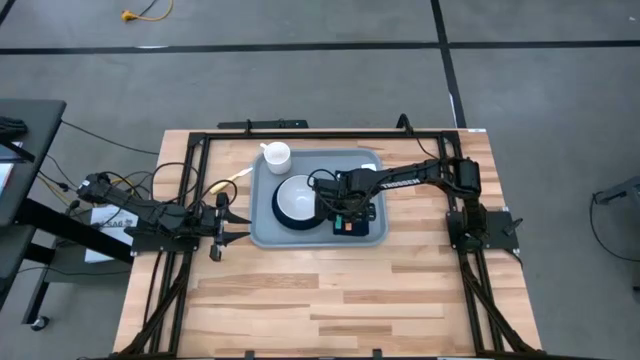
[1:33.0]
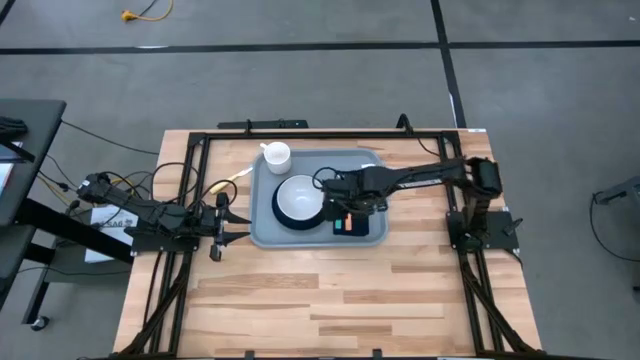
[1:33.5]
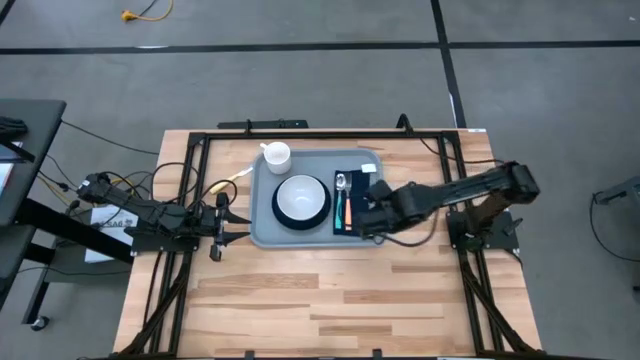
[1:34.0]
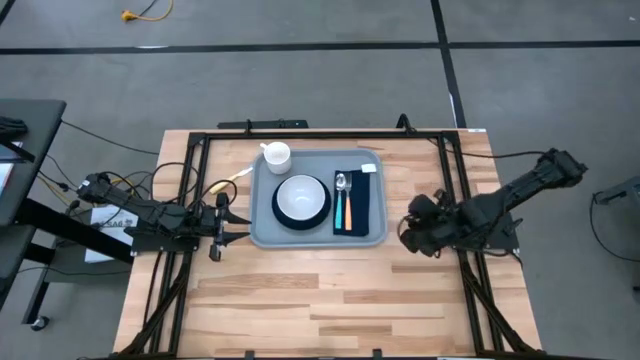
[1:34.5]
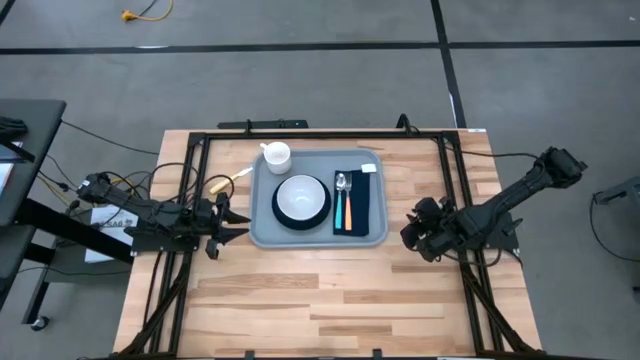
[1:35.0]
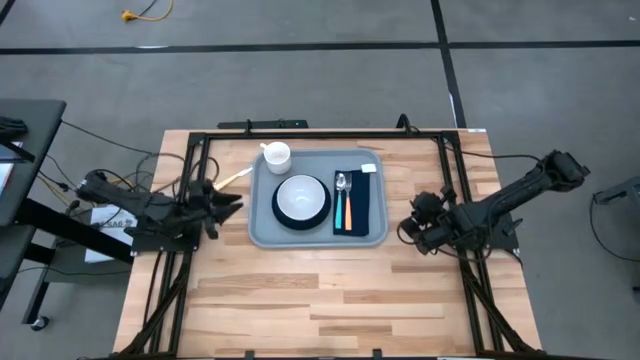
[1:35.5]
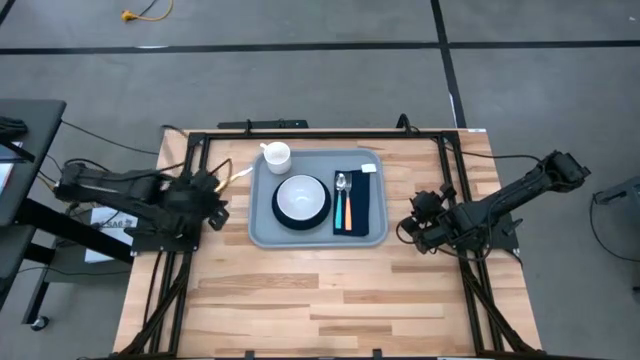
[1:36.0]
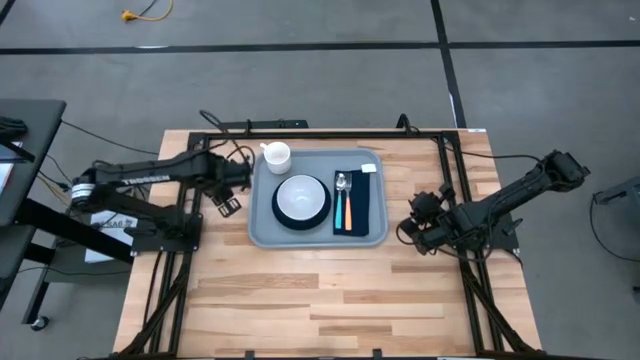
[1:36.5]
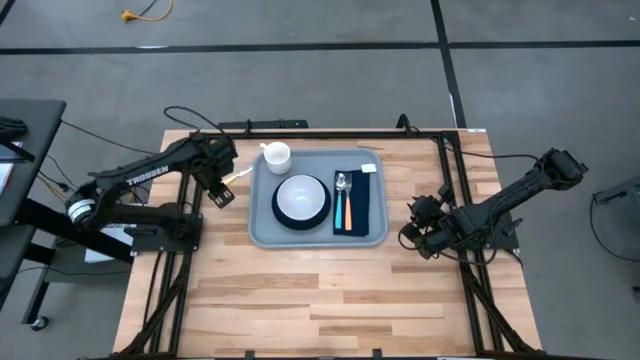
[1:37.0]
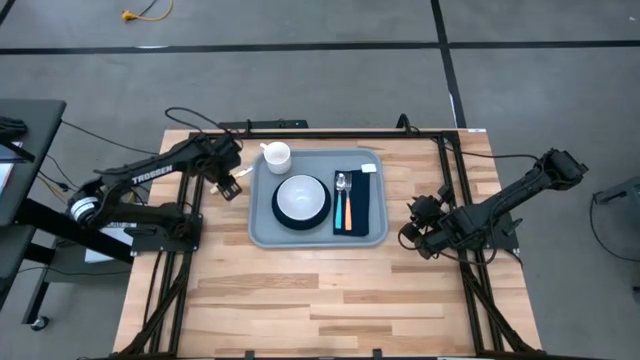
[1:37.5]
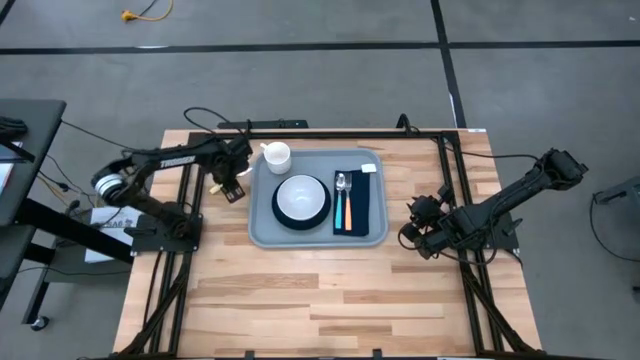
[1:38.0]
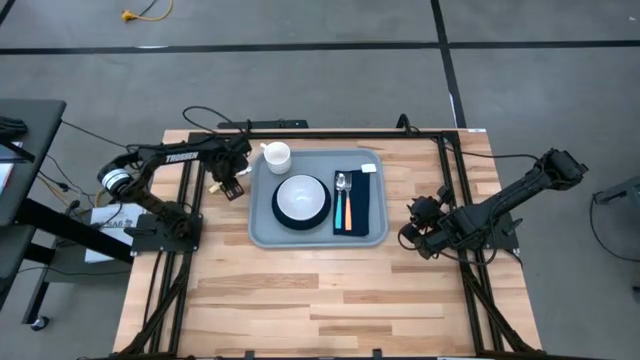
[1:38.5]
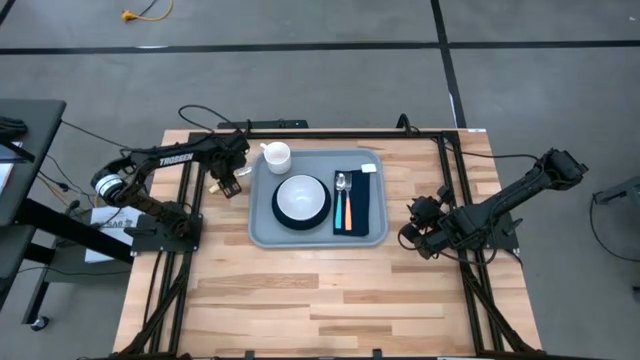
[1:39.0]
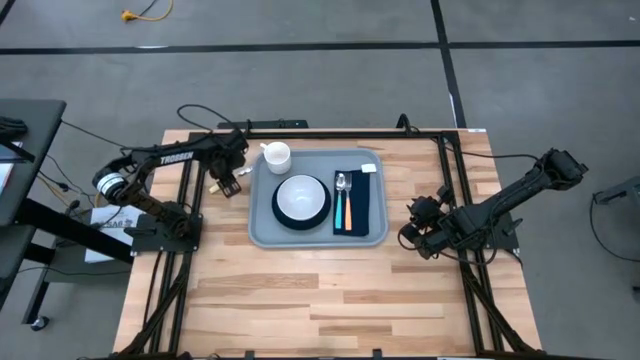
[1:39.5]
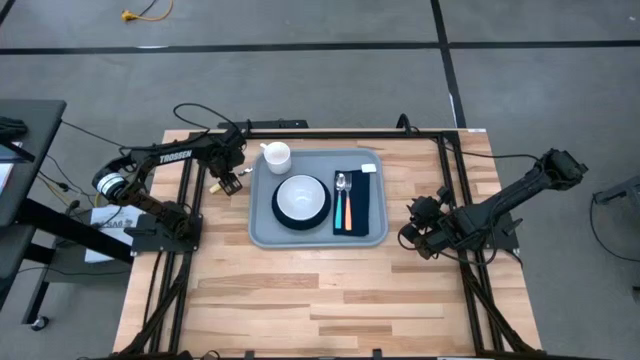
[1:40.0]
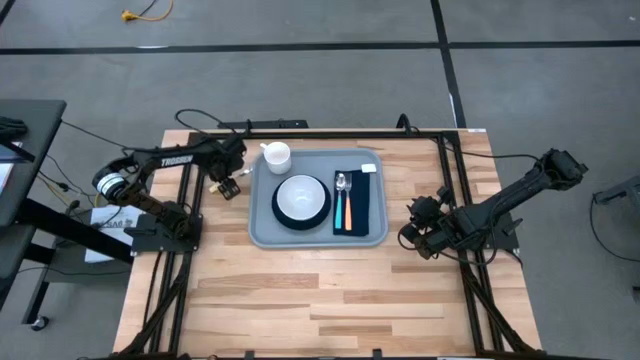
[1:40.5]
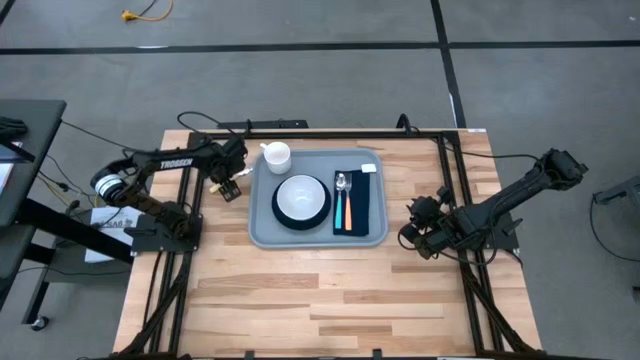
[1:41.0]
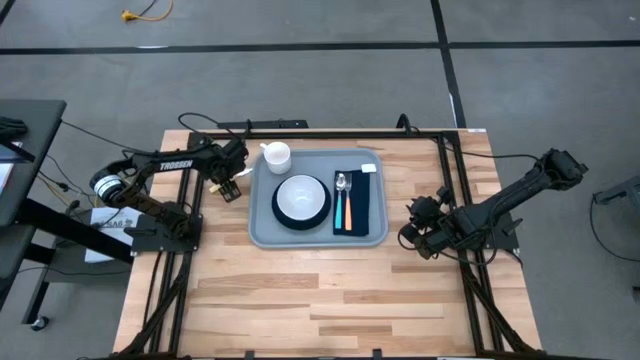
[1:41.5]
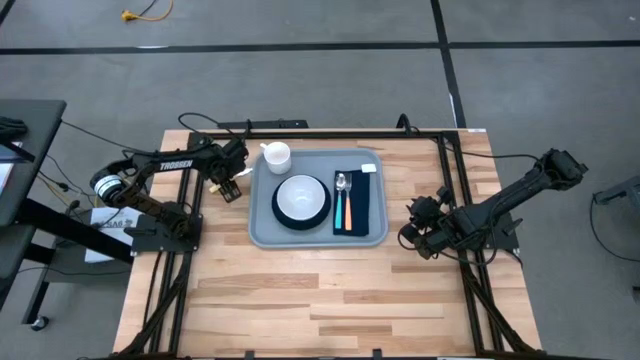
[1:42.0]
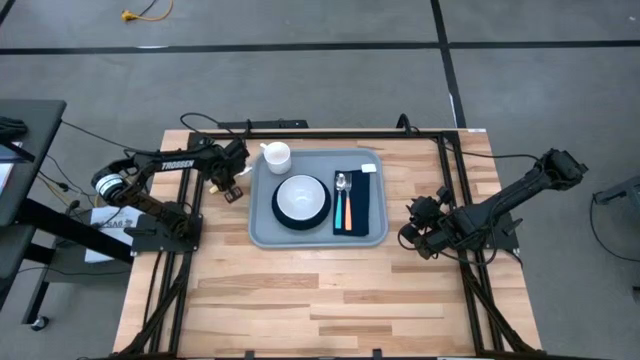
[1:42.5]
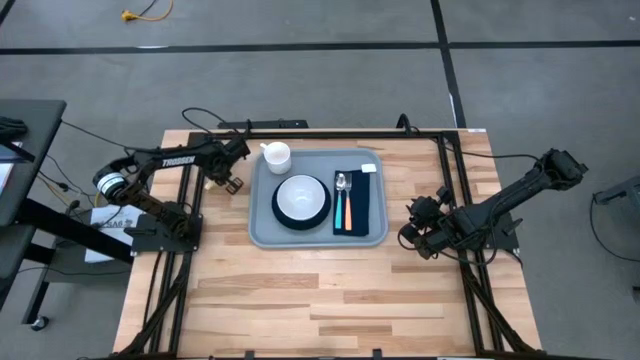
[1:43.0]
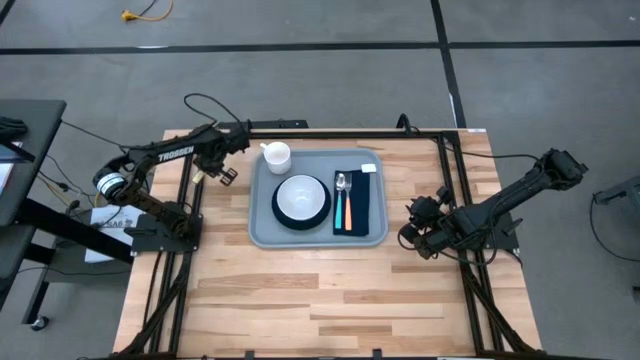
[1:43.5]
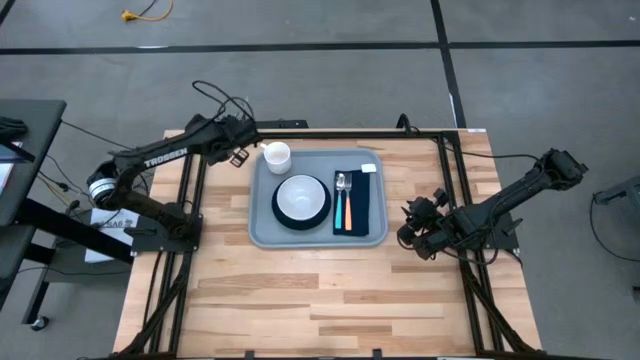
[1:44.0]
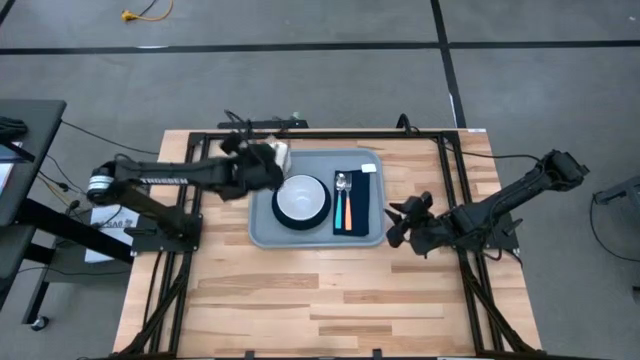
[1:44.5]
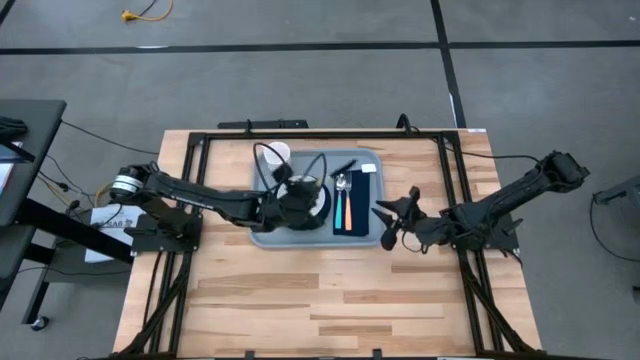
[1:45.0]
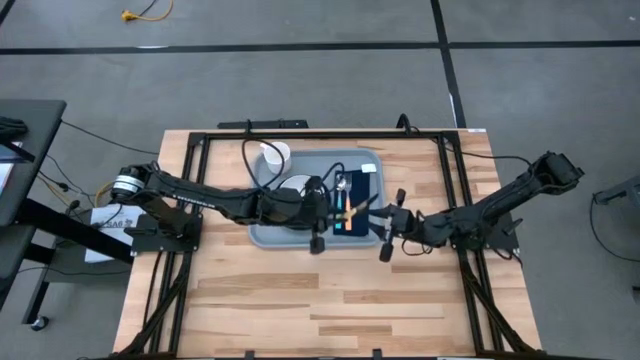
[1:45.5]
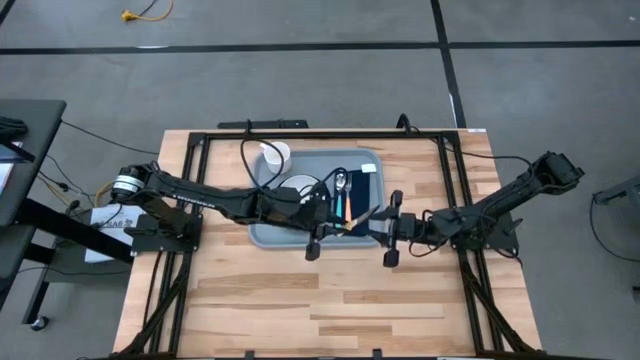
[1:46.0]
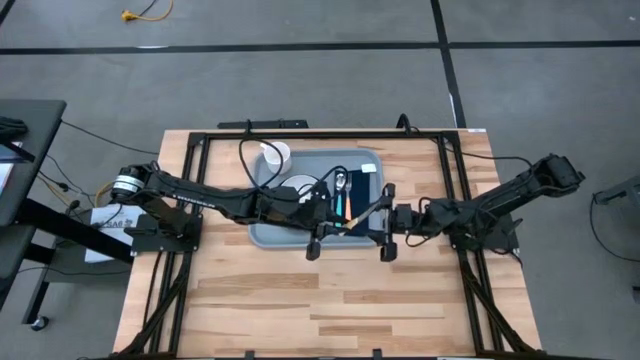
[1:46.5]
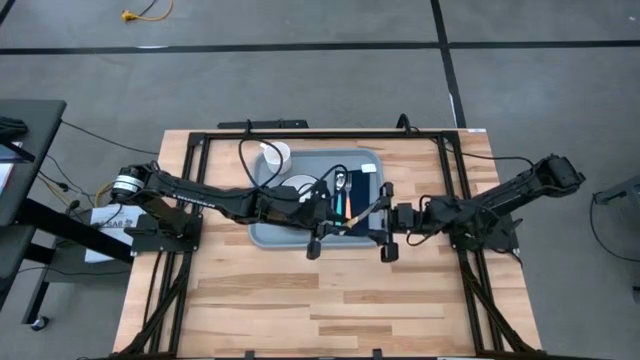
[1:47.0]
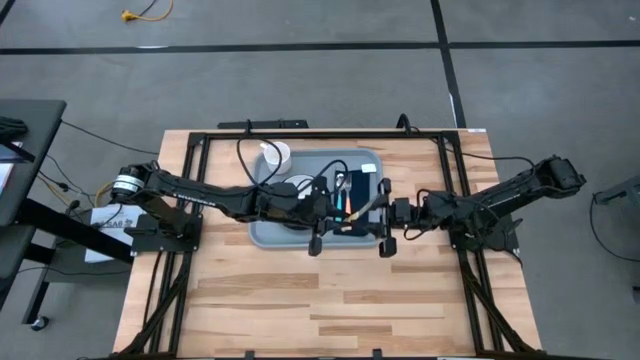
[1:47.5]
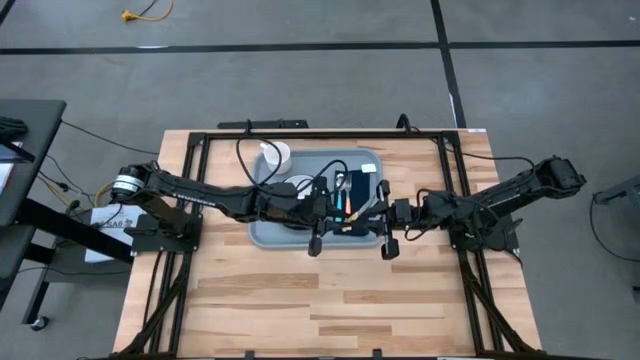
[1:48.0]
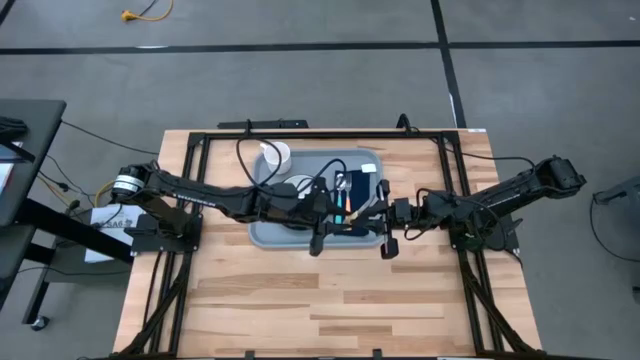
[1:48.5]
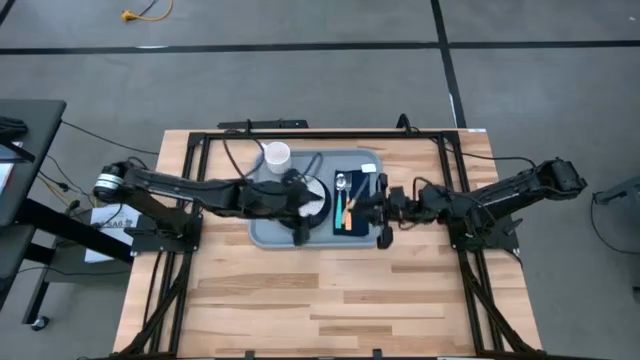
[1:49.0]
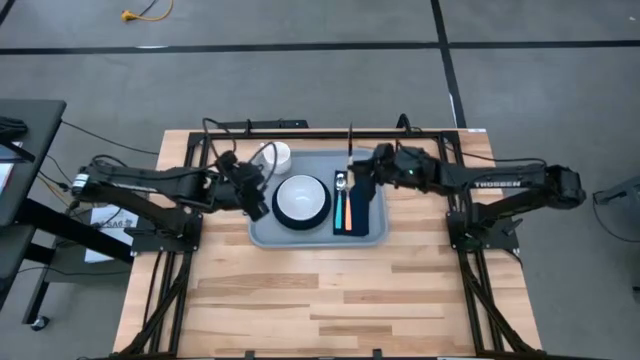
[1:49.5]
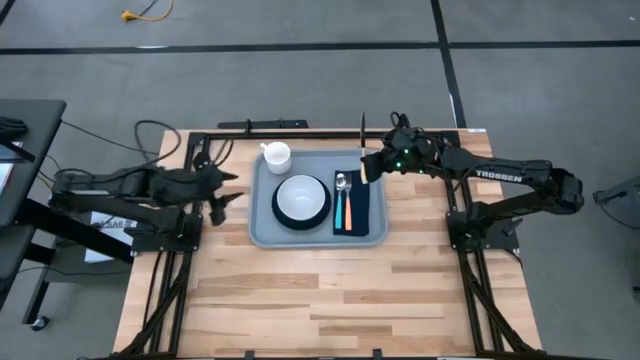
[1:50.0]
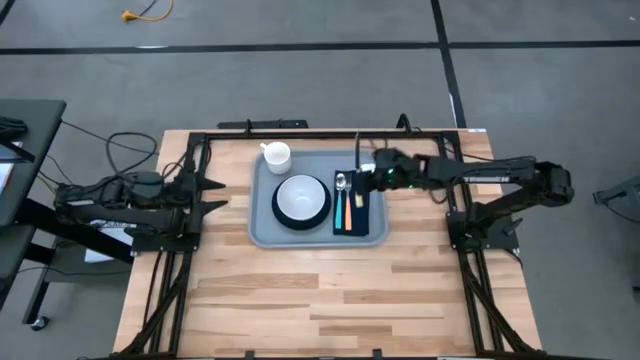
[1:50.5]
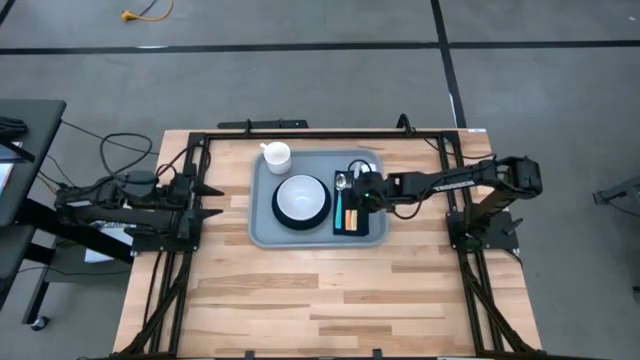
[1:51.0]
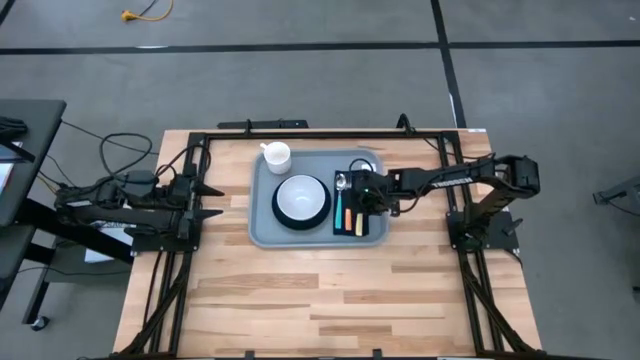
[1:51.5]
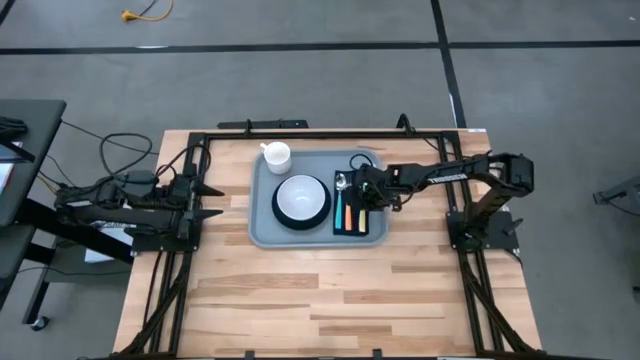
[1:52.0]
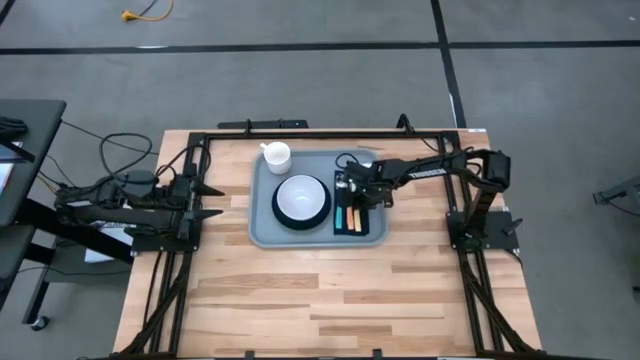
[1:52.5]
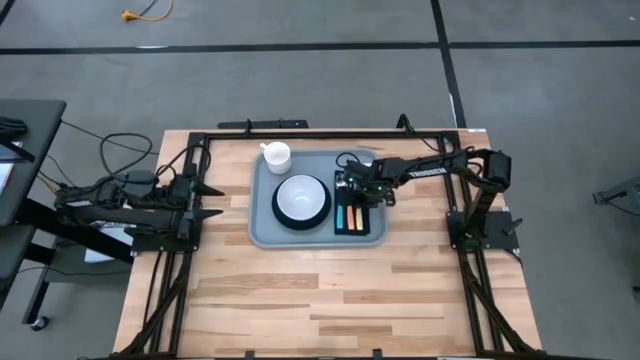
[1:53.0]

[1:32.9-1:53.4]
Task: Set up tray
Put the yellow knife on top of the black napkin to the right of the orange fork
